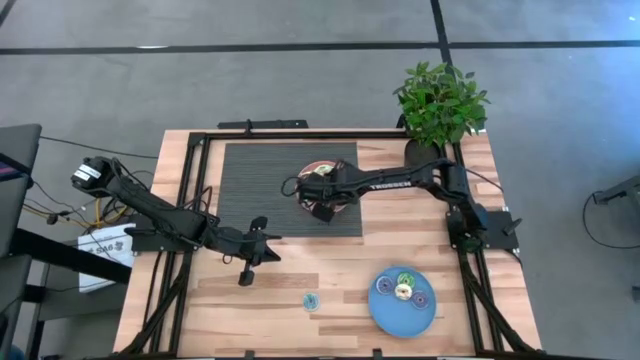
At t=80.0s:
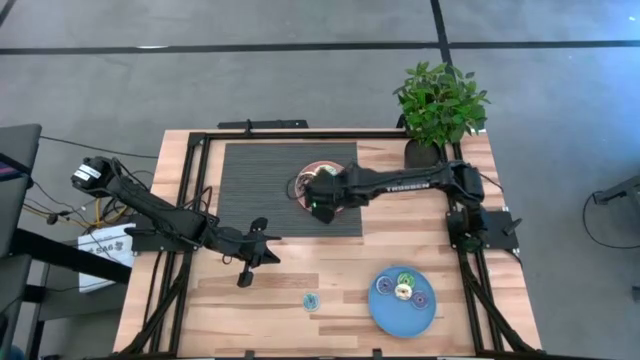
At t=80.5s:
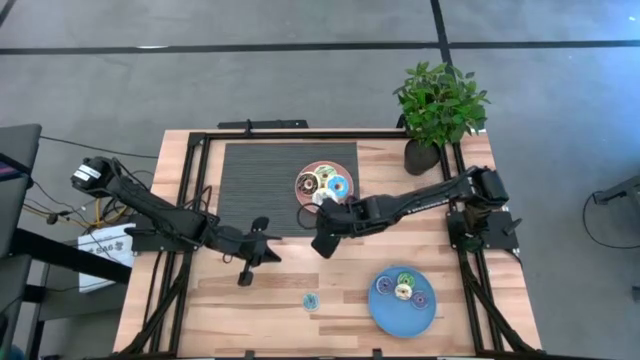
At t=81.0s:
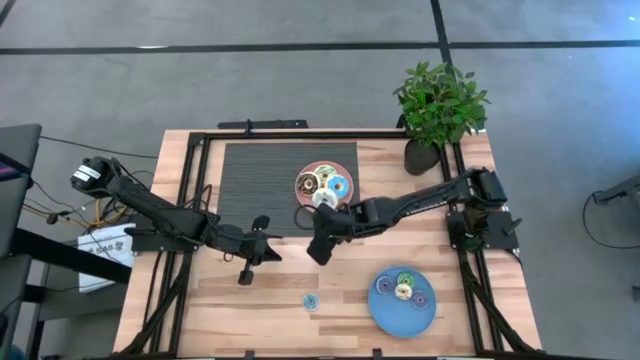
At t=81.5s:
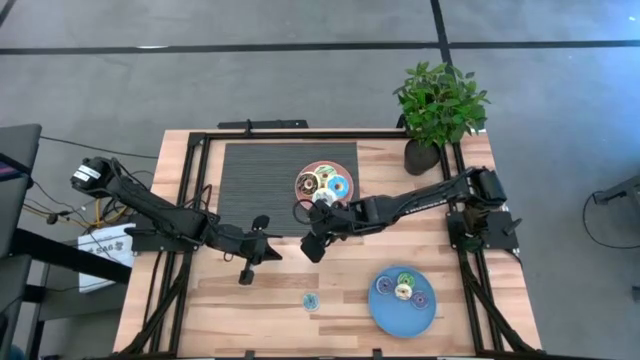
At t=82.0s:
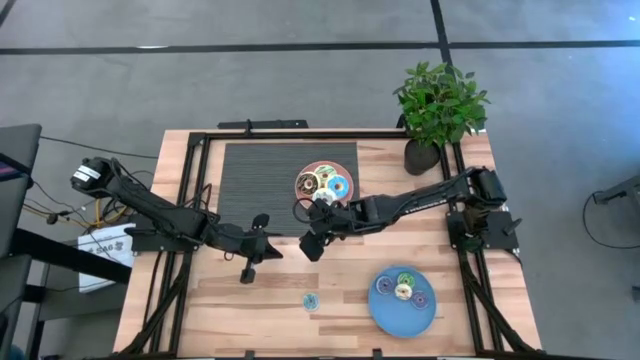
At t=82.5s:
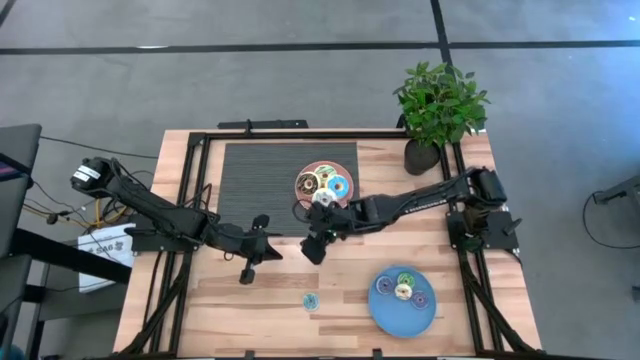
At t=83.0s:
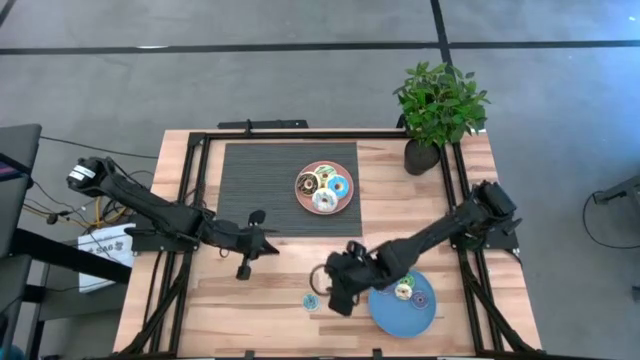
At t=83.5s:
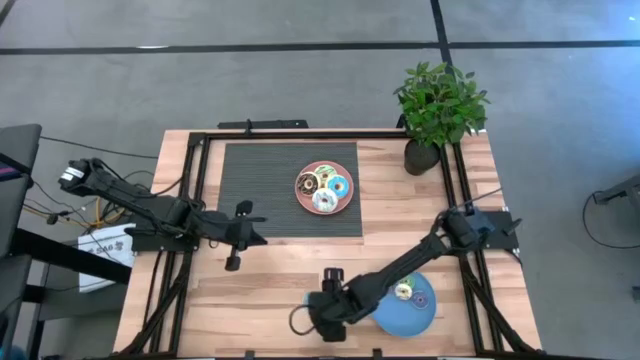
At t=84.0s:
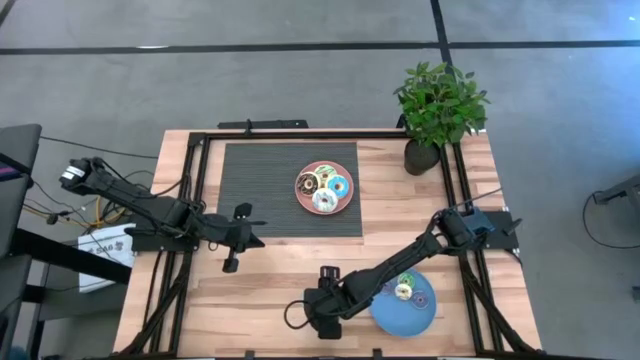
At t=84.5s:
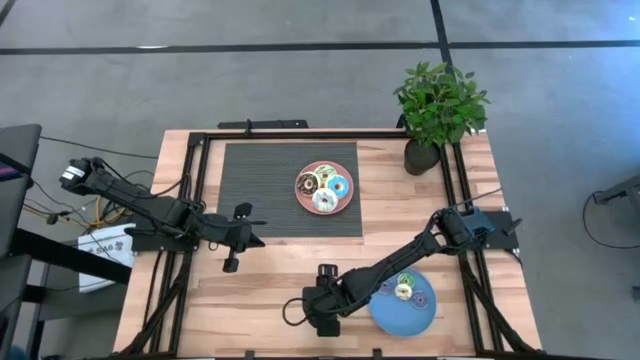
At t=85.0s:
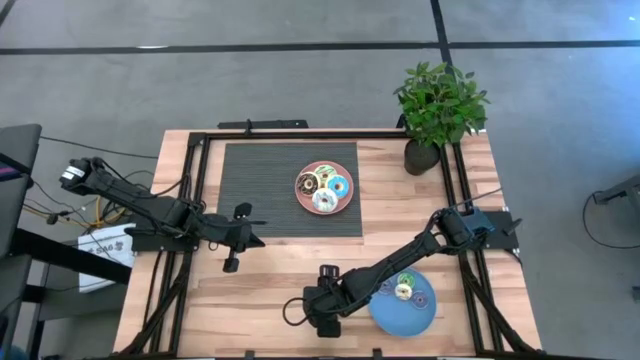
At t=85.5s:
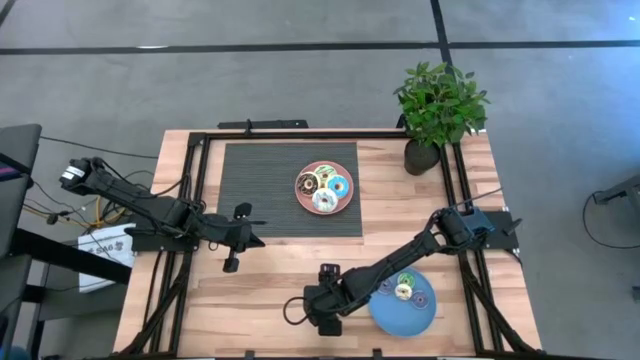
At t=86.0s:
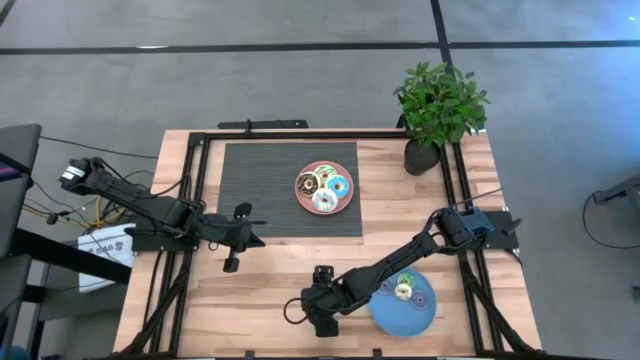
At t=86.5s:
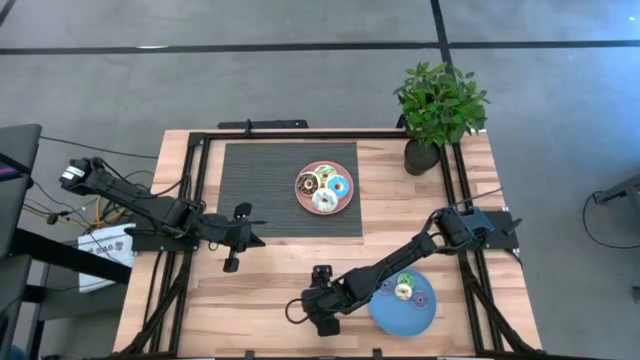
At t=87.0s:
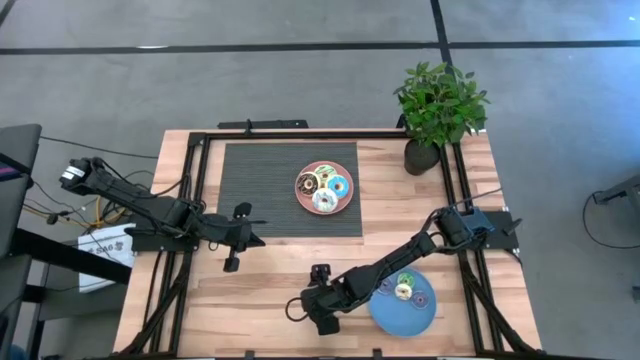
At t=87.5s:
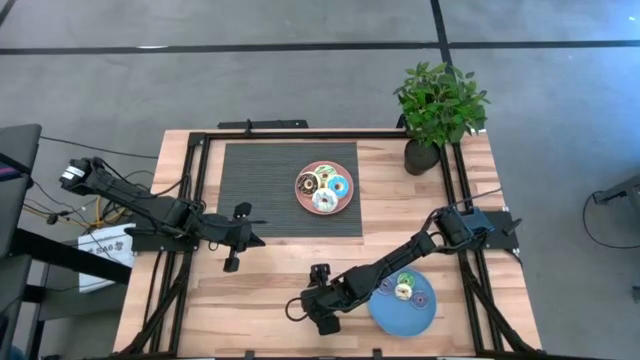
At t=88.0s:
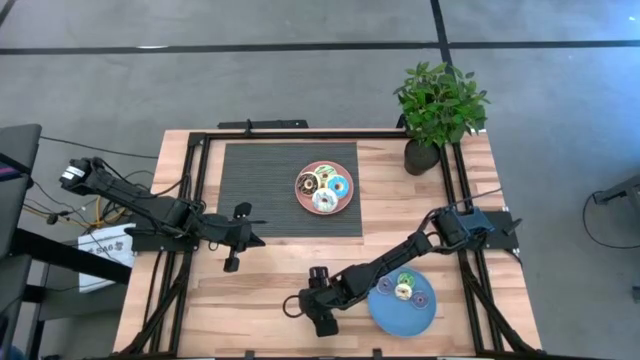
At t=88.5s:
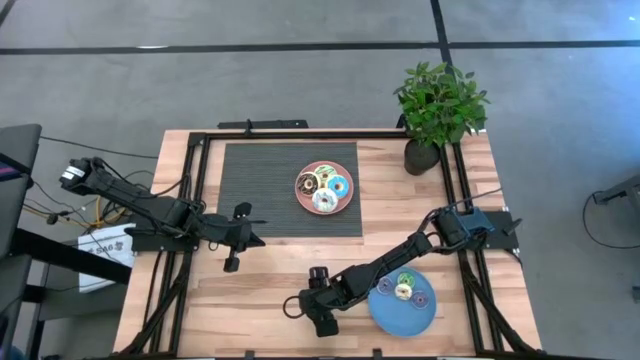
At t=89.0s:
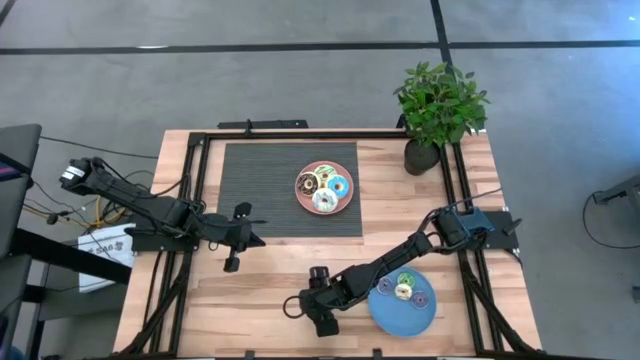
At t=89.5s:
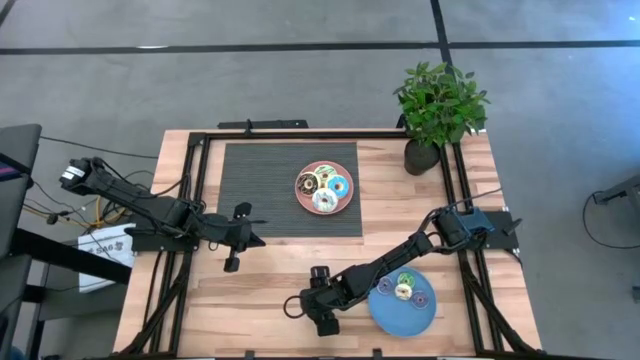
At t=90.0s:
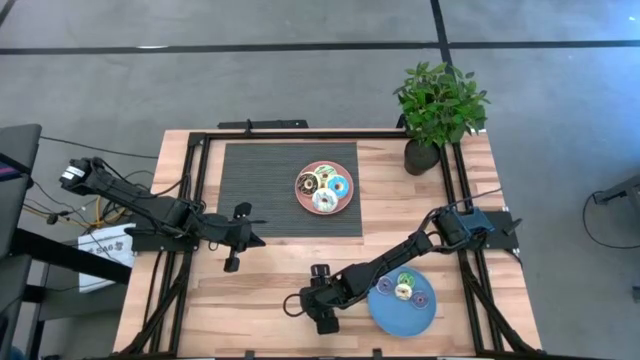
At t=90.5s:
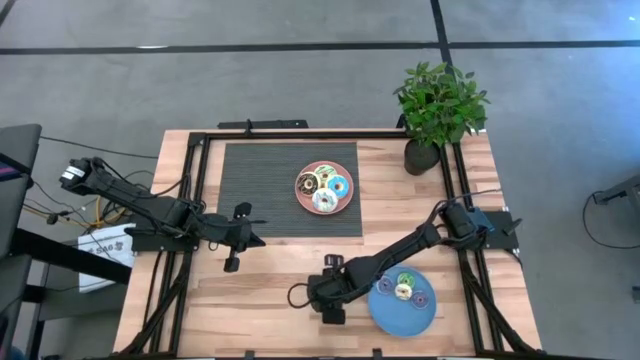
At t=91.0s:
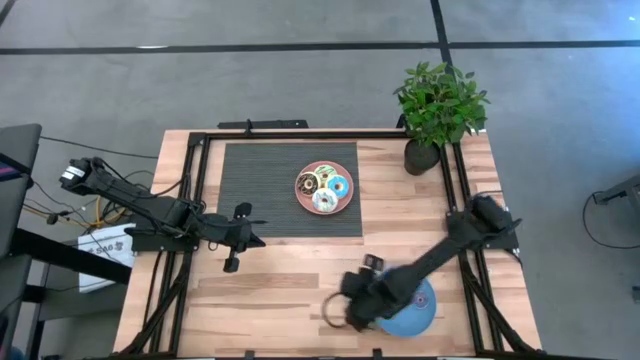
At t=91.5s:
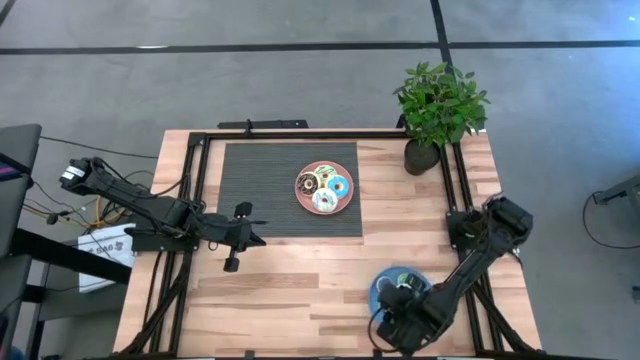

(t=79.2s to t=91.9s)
Task: Pick & Place donuts
Put the small blue donut on the blue plate

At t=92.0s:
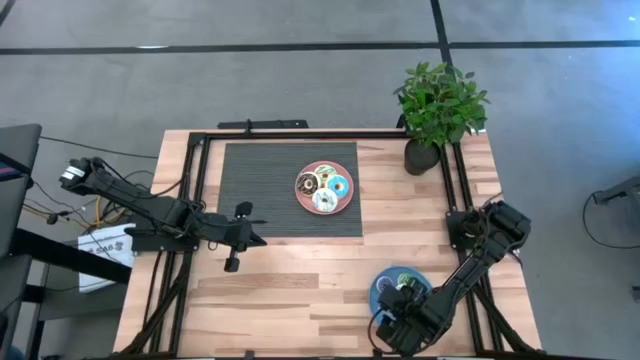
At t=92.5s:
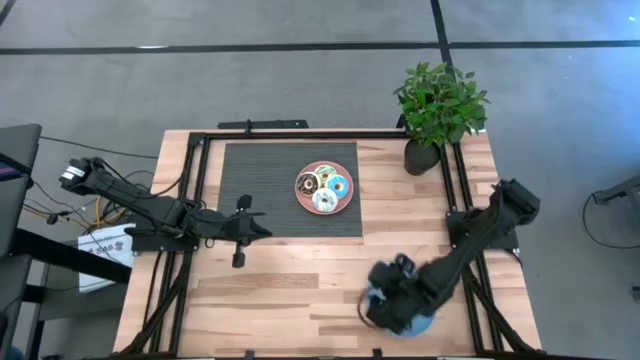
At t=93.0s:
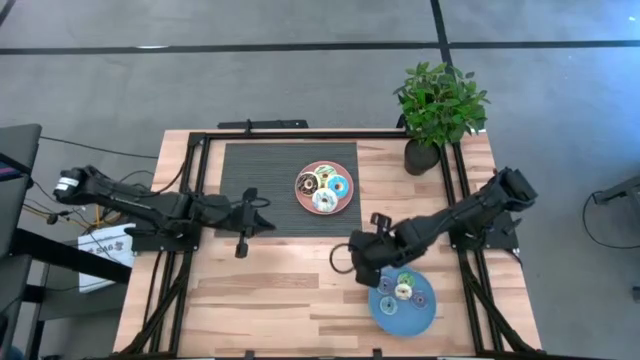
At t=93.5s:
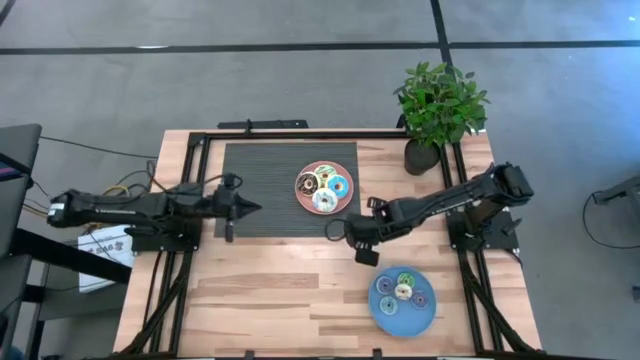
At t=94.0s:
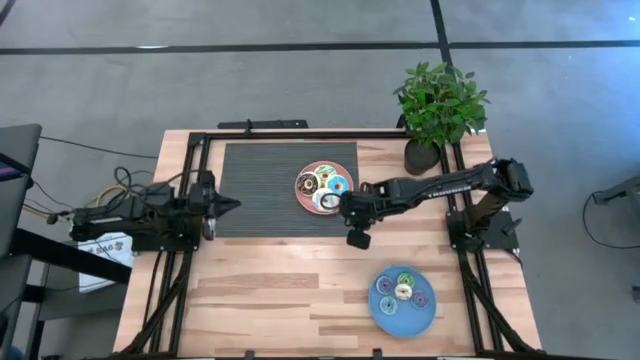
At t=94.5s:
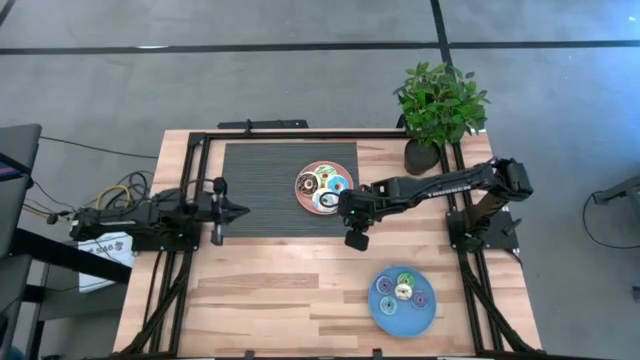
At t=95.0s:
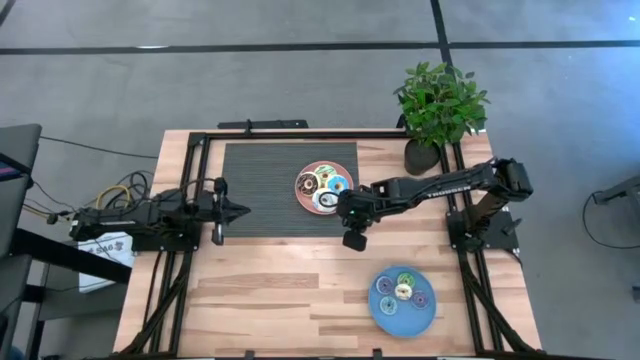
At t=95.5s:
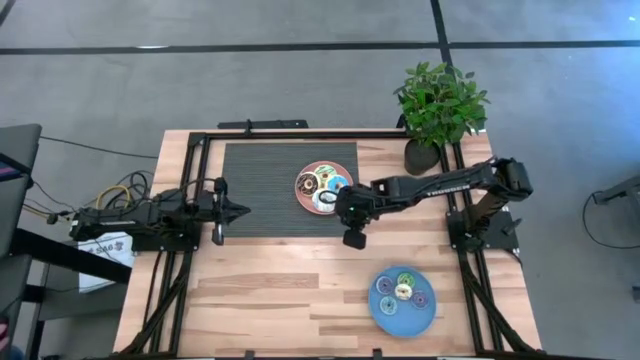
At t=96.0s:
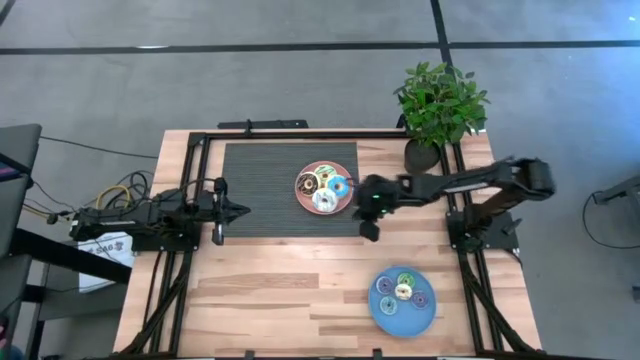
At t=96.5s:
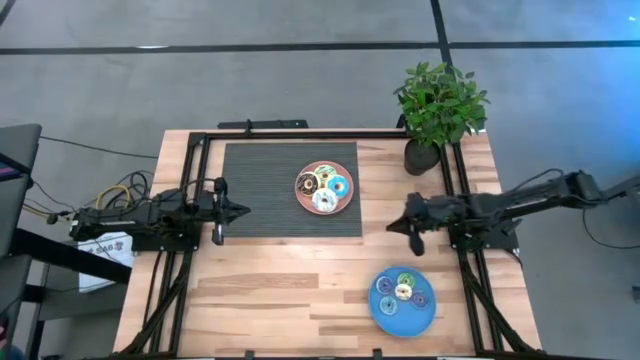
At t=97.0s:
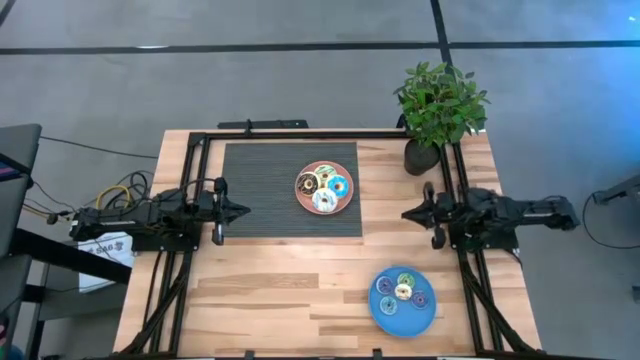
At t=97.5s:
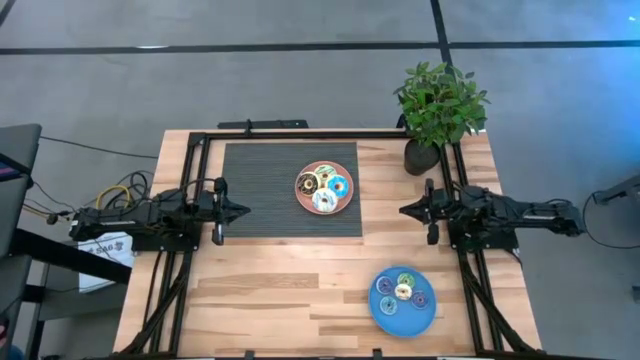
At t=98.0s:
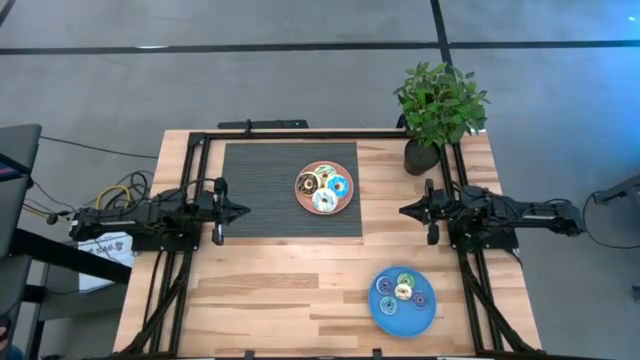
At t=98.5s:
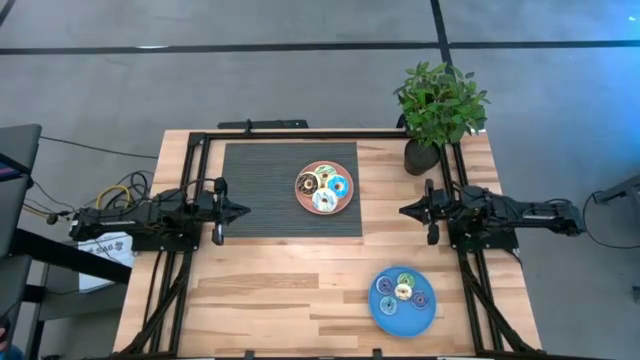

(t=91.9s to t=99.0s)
Return to Home Position

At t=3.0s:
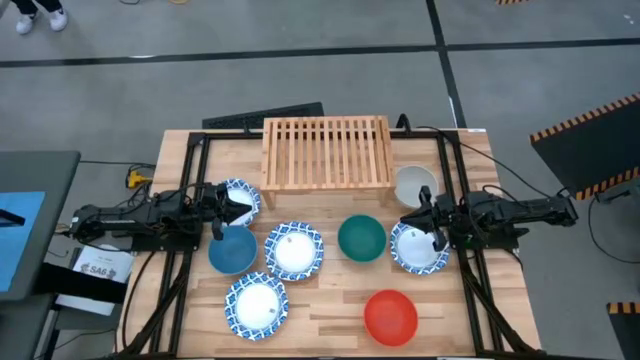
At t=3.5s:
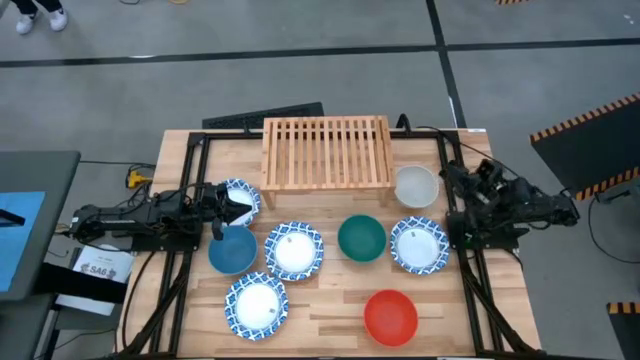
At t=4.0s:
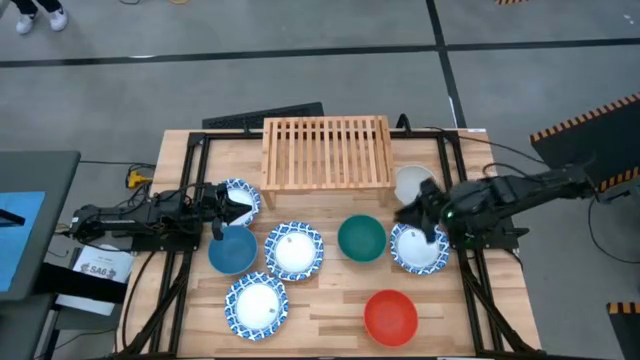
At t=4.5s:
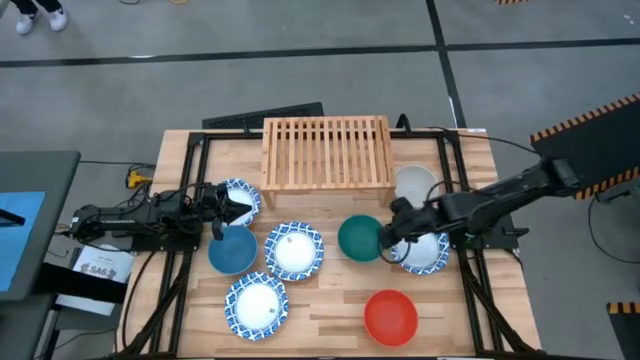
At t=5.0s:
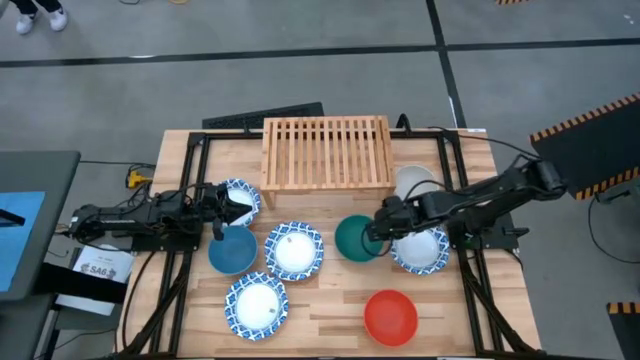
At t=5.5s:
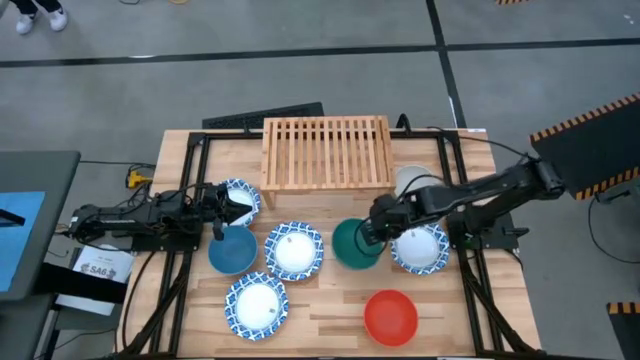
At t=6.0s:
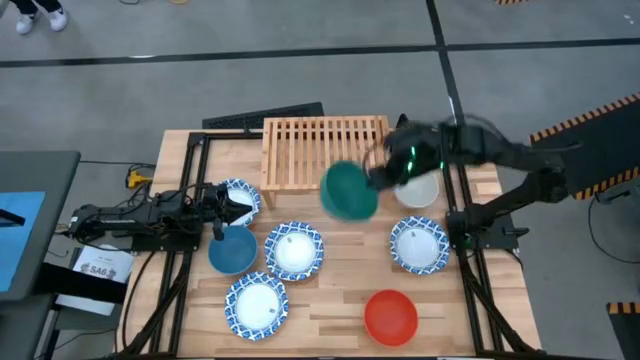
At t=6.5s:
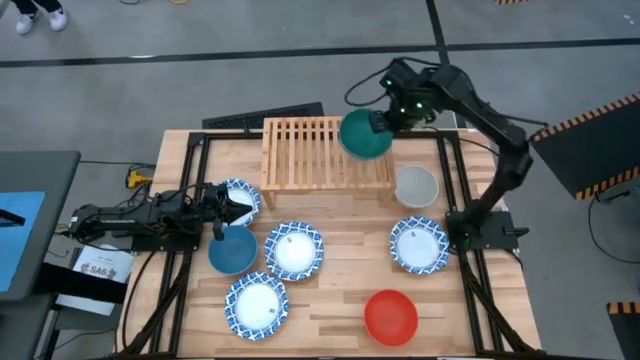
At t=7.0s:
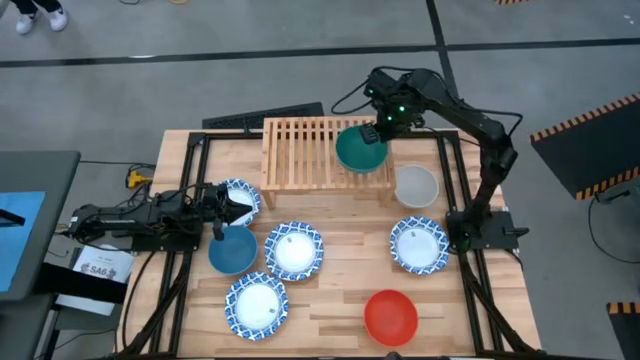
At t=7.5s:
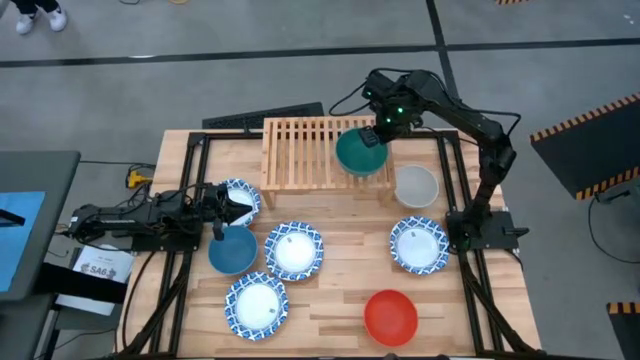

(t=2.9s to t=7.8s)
Task: Place and stack bowls onto a shelf
Put the green bowl on the shelf
